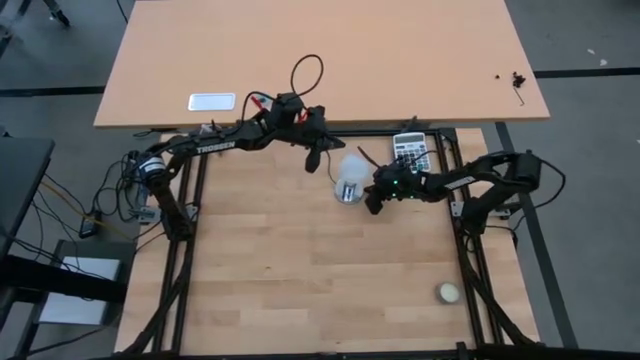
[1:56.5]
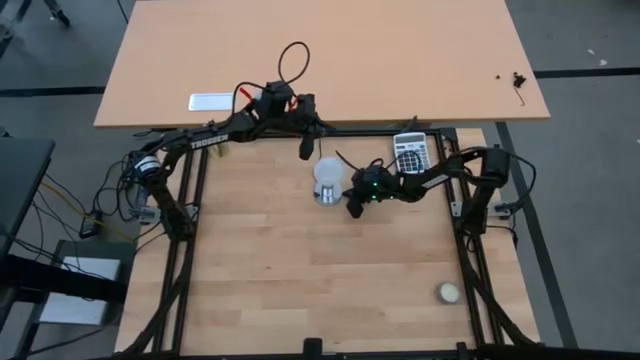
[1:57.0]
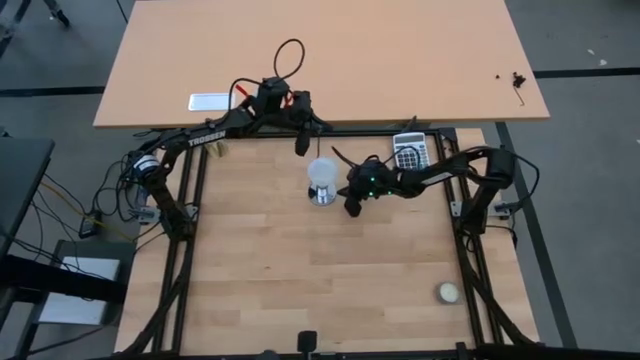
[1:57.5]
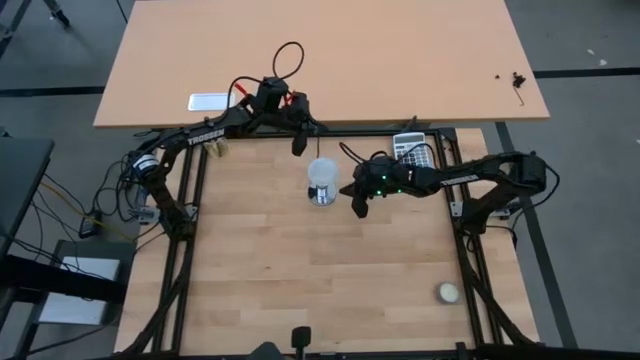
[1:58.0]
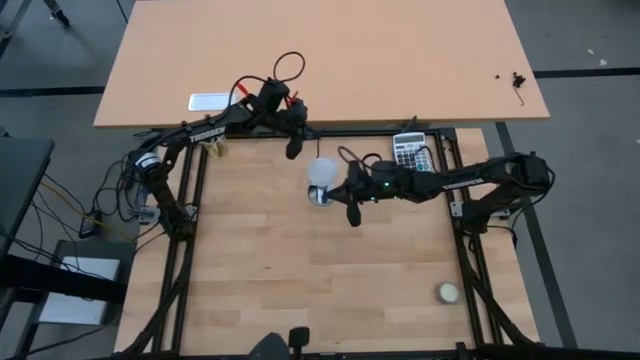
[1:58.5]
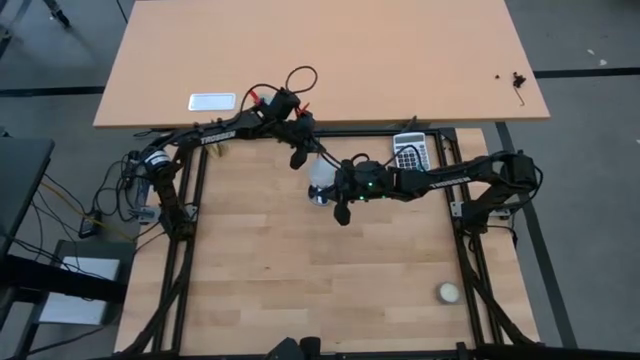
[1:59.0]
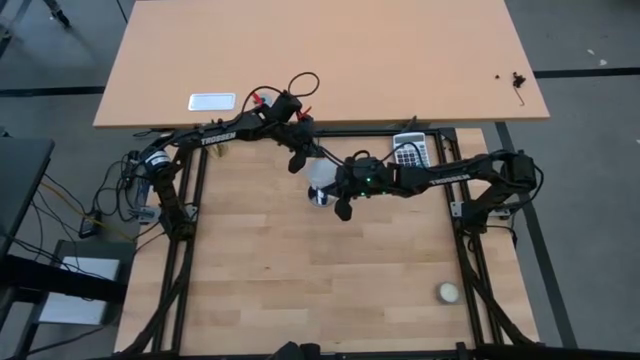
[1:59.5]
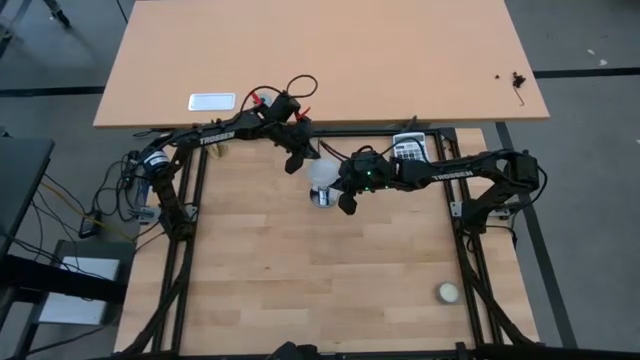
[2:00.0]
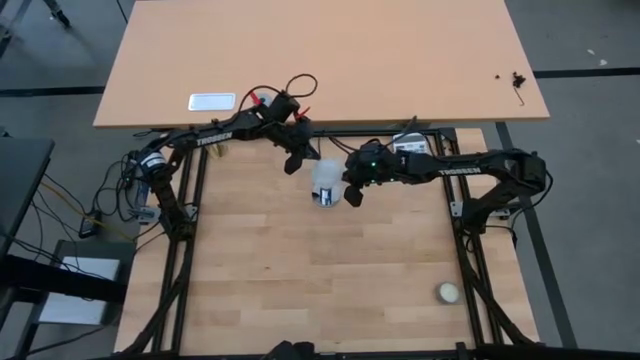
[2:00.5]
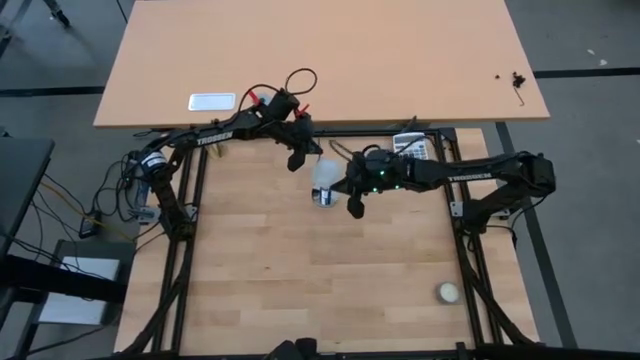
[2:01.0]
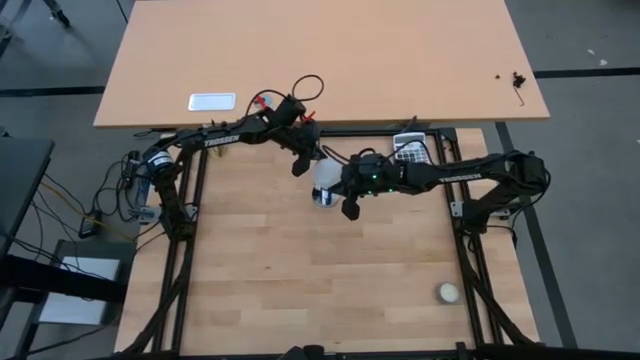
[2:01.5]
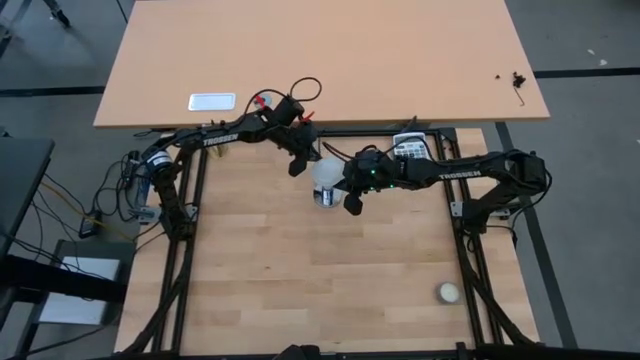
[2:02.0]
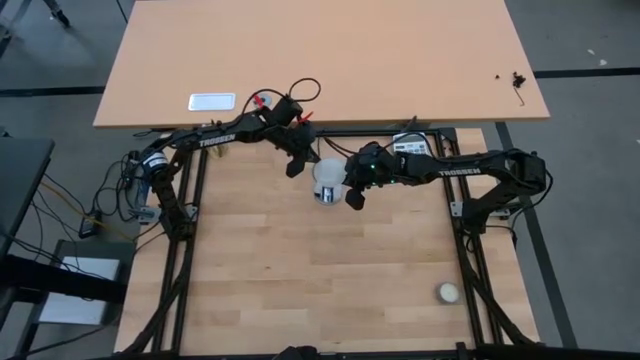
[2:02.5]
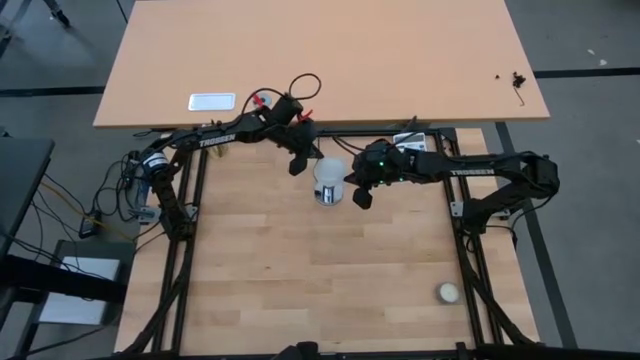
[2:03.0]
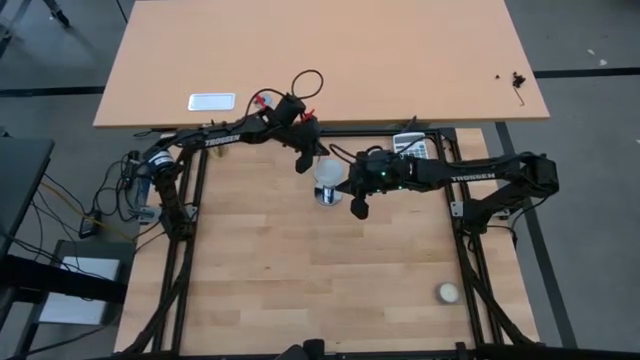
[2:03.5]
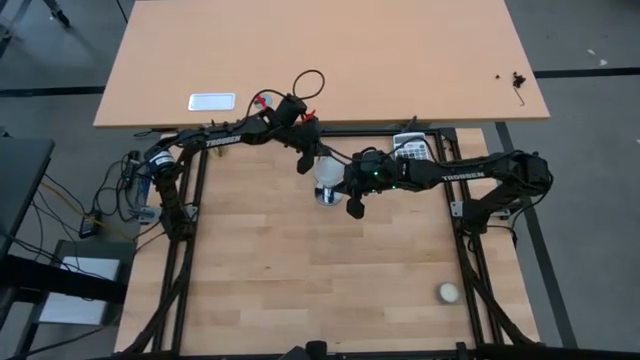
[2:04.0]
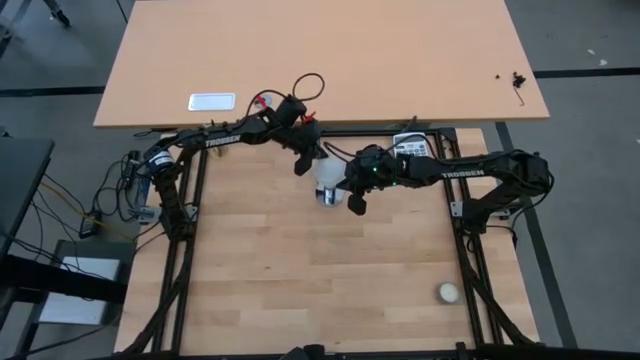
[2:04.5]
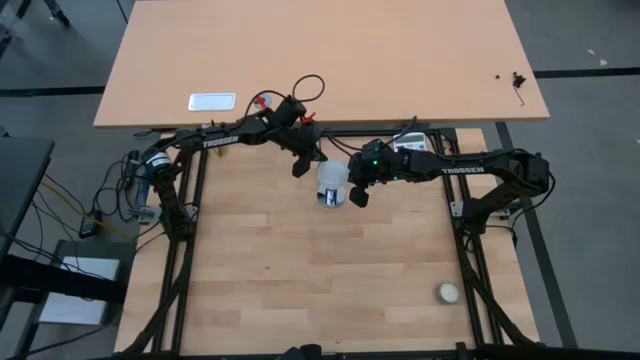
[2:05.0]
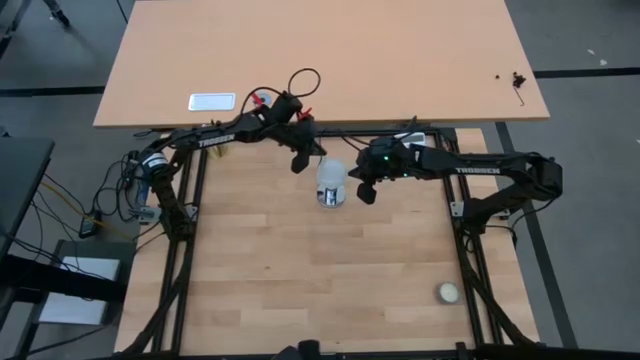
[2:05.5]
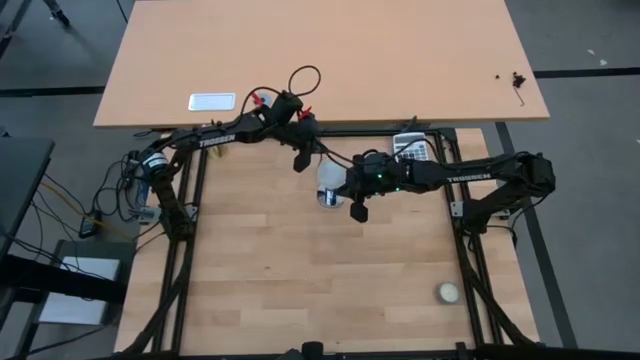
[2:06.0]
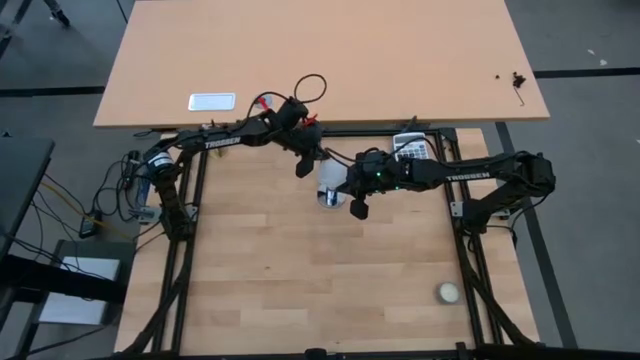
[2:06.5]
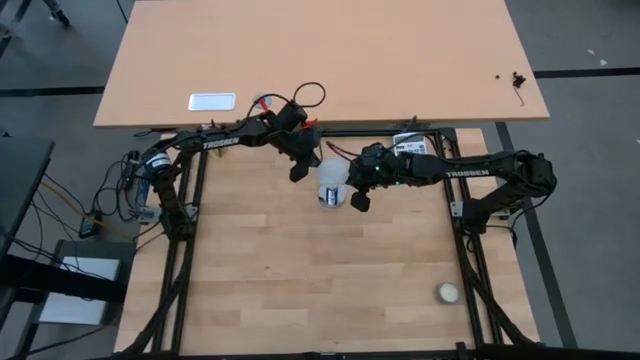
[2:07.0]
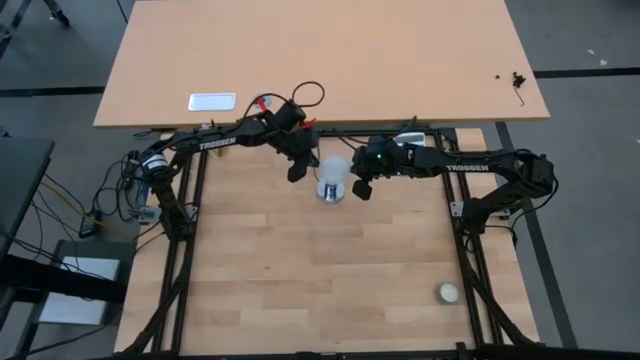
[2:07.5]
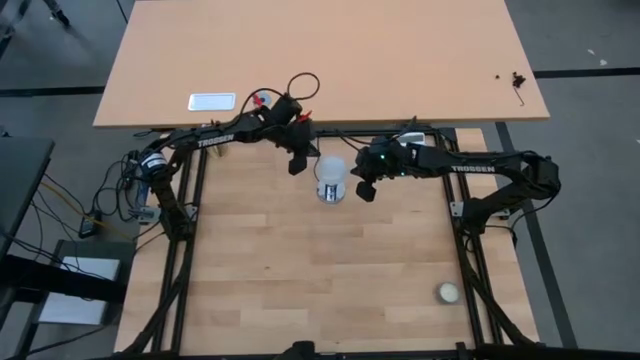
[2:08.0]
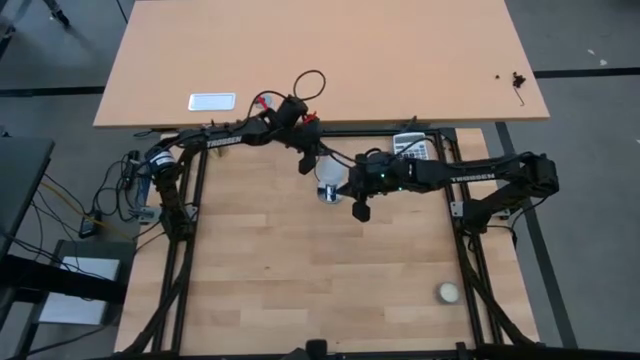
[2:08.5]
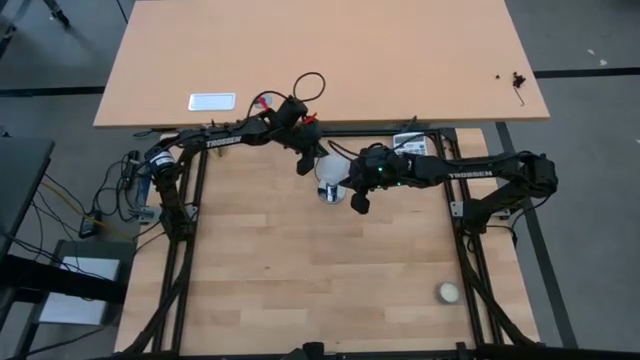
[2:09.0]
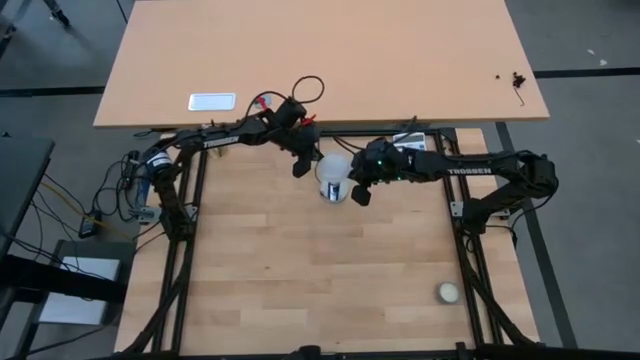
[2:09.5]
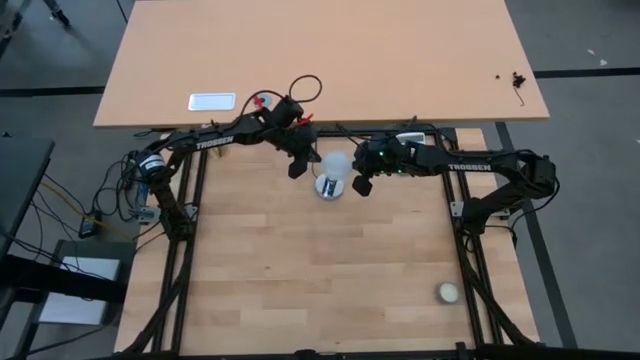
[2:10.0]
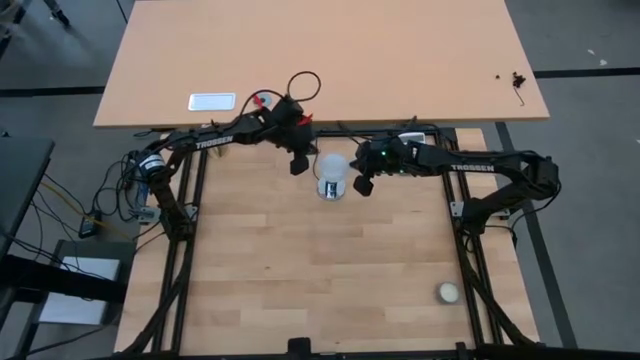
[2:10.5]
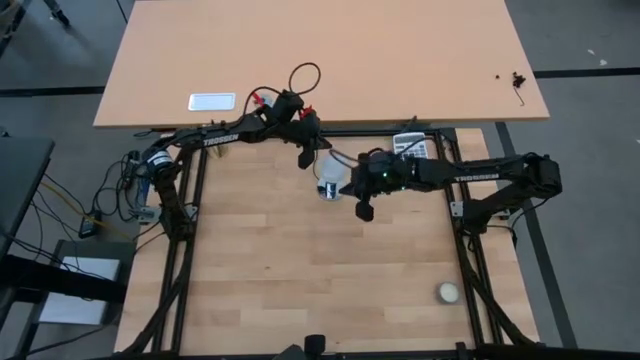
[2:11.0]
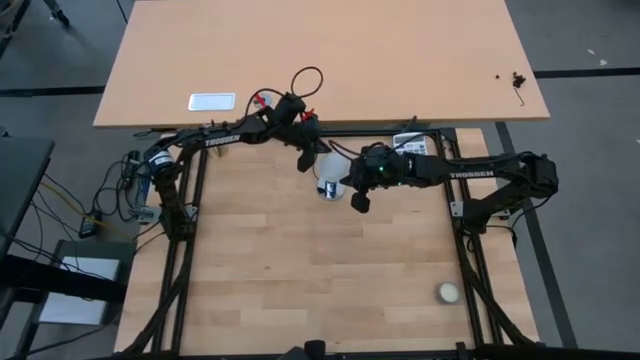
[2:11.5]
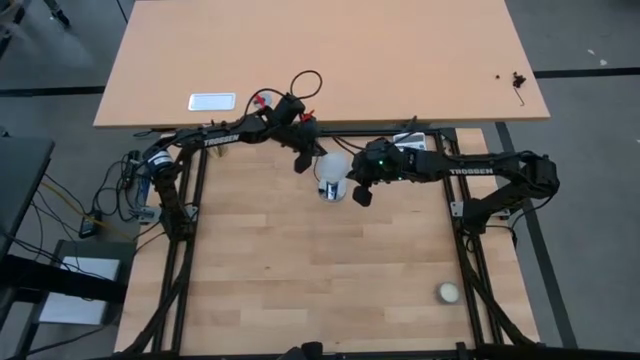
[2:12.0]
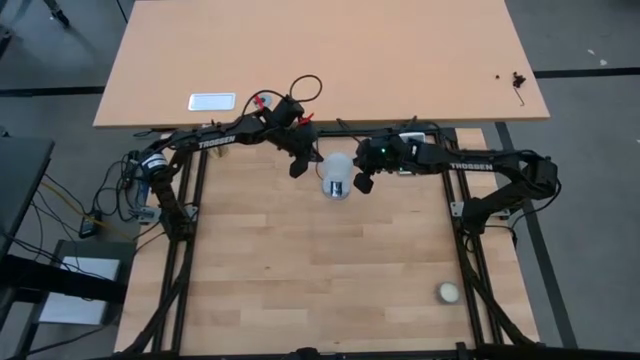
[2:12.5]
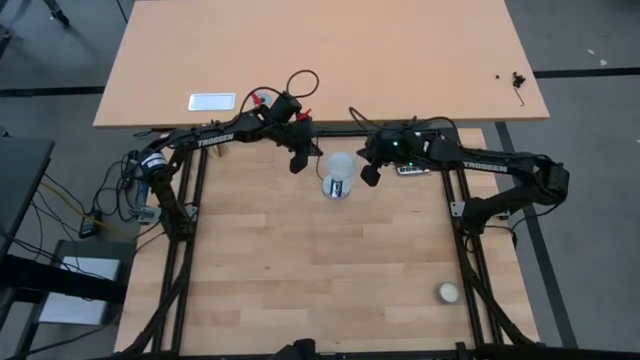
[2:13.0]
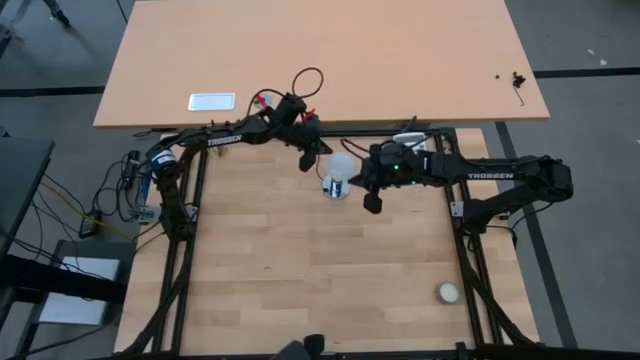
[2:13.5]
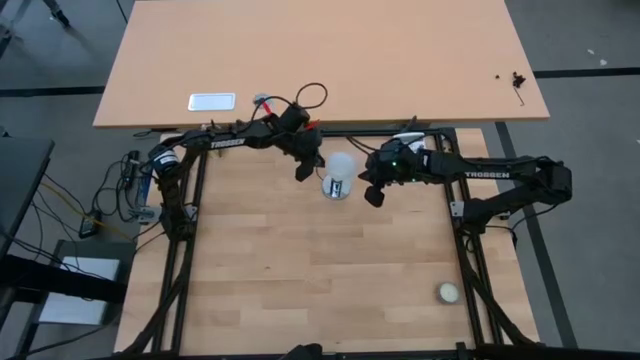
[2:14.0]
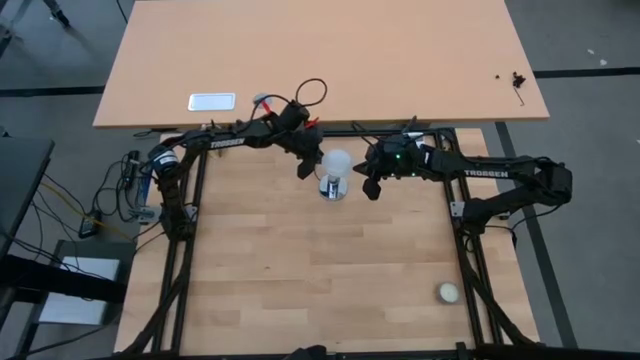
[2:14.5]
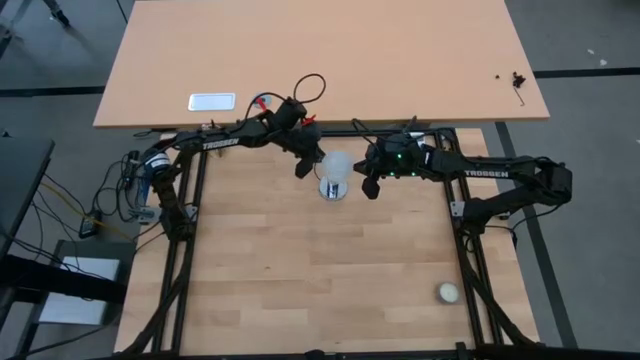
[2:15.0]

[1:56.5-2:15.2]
Task: Screw lightbulb
Remove the white lightbulb from the silver lamp

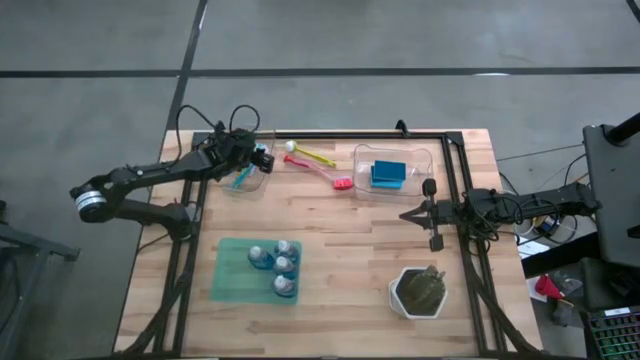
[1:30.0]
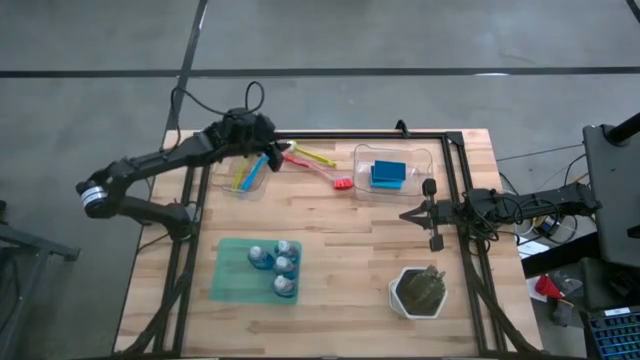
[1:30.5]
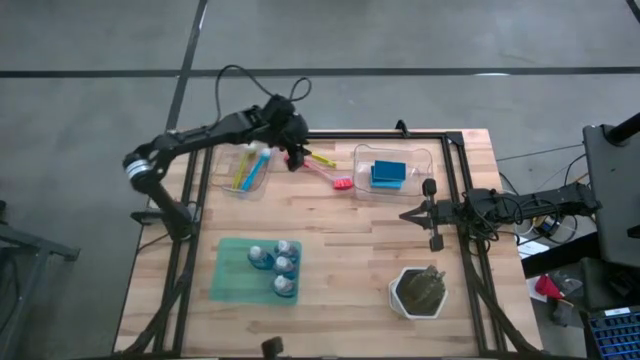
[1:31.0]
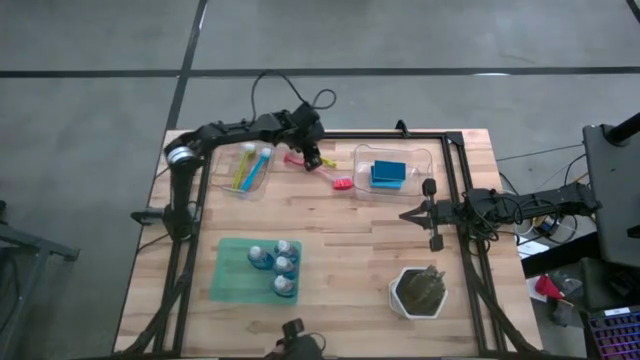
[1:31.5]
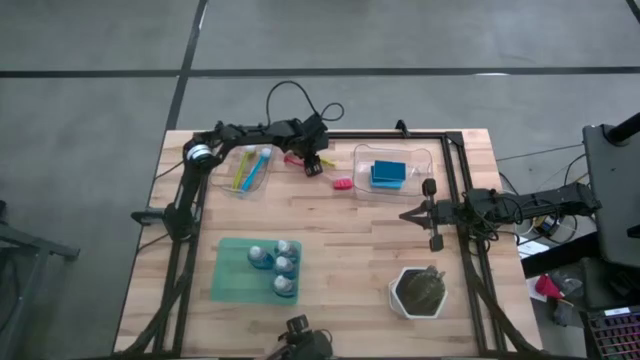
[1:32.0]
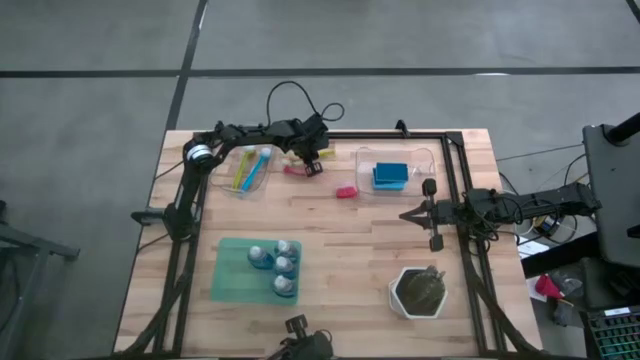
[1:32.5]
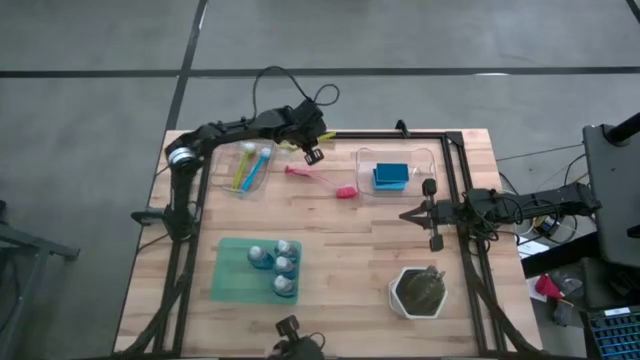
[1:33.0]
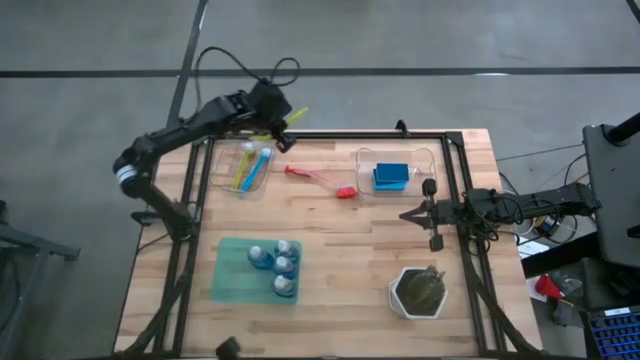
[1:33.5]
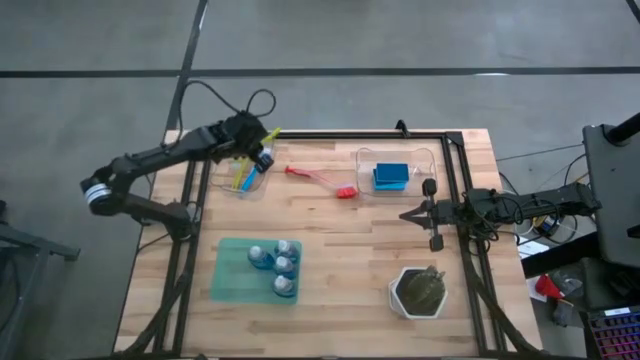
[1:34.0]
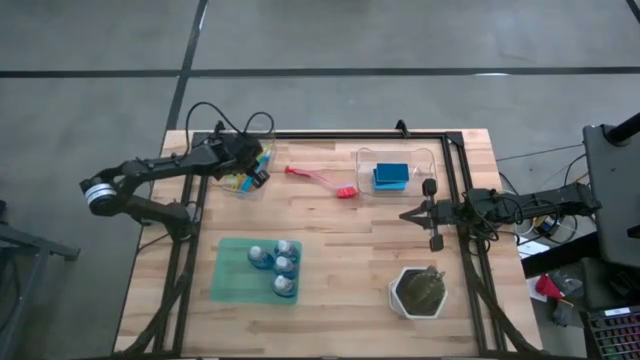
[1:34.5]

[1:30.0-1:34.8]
Task: Pick & Place Kitchen Sink Supplies
Put the green dishwashing brush into the left transparent bin
